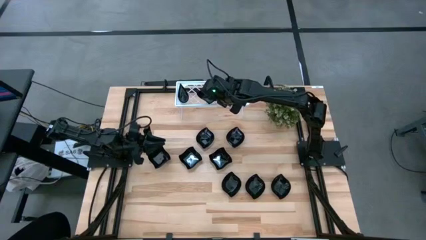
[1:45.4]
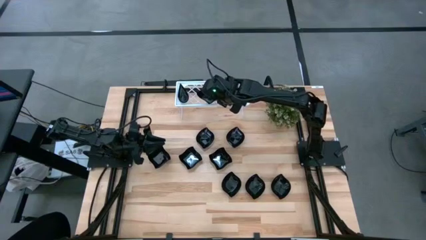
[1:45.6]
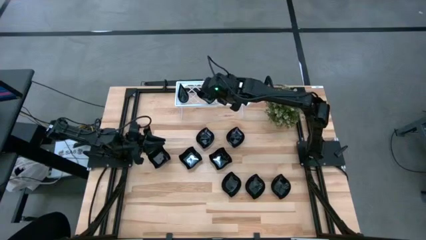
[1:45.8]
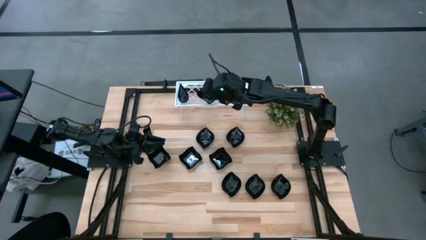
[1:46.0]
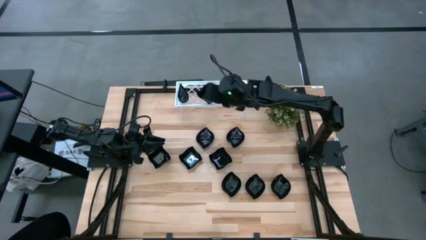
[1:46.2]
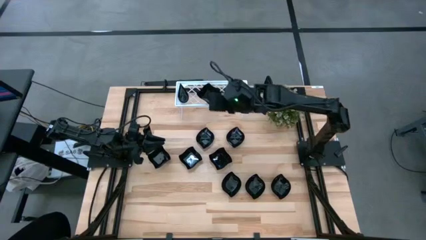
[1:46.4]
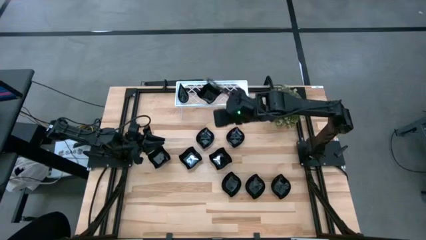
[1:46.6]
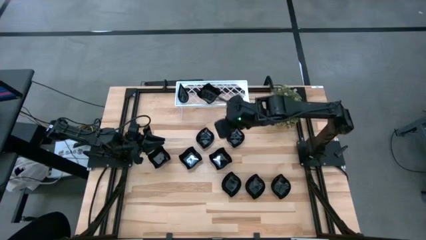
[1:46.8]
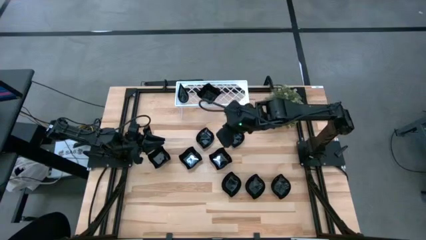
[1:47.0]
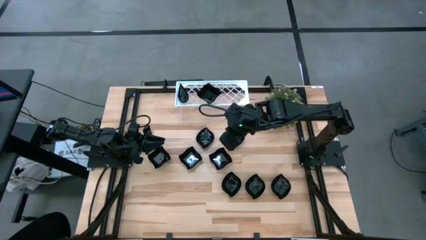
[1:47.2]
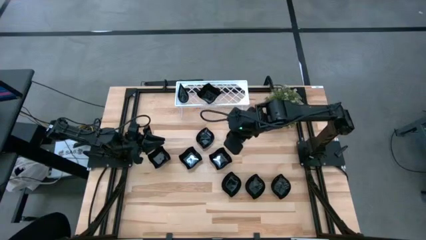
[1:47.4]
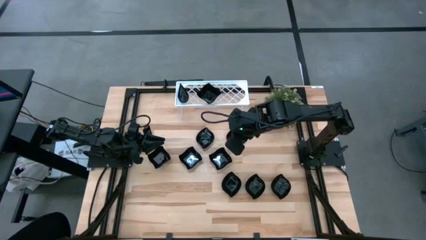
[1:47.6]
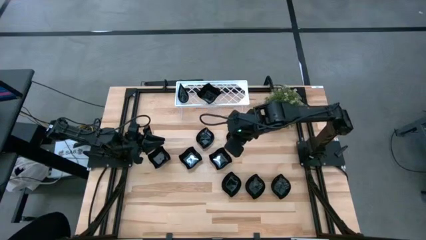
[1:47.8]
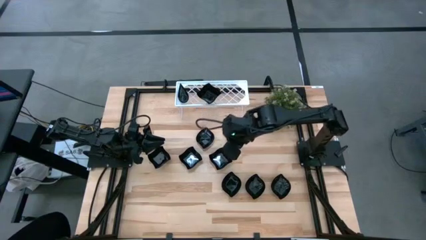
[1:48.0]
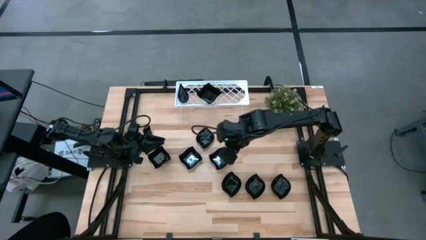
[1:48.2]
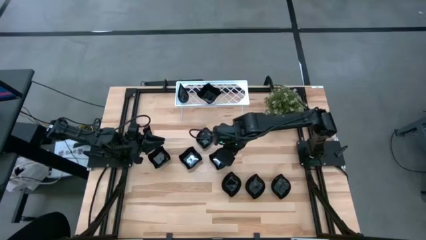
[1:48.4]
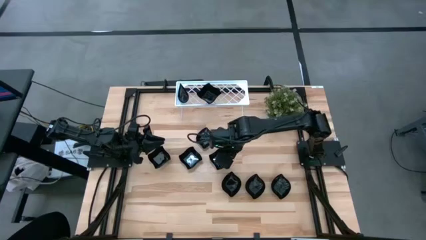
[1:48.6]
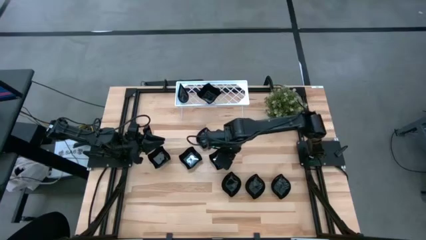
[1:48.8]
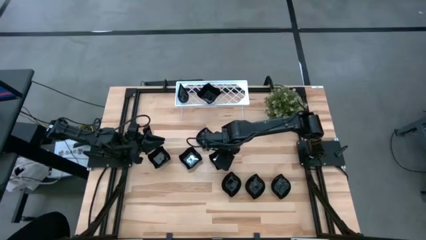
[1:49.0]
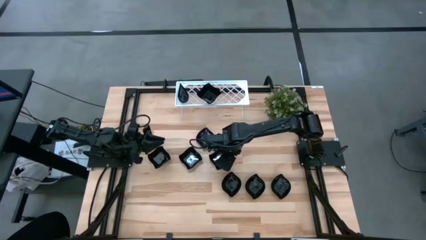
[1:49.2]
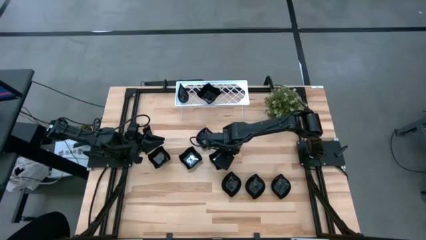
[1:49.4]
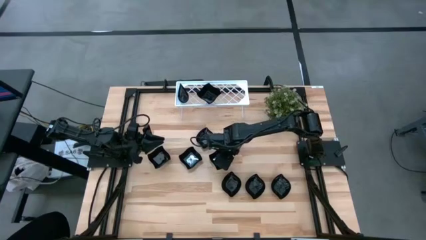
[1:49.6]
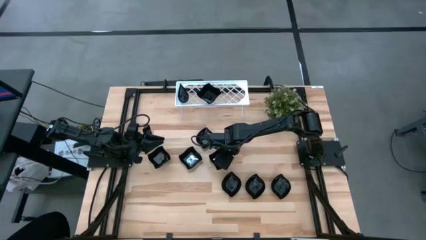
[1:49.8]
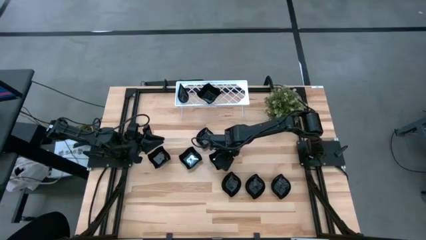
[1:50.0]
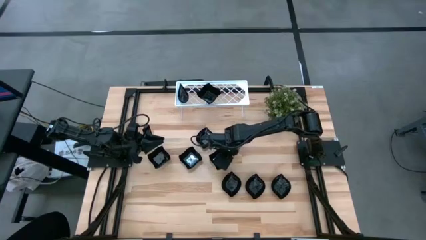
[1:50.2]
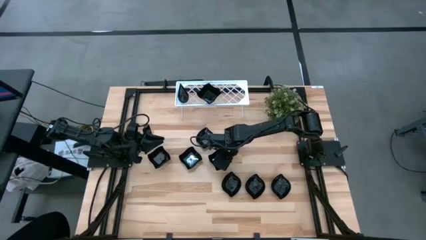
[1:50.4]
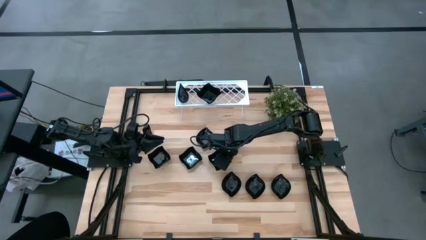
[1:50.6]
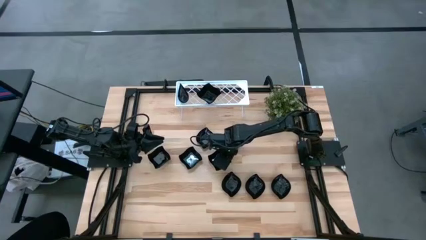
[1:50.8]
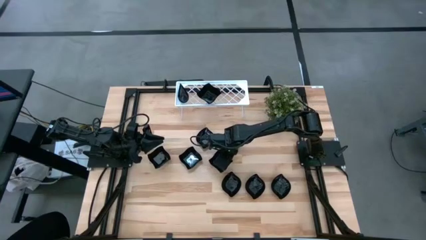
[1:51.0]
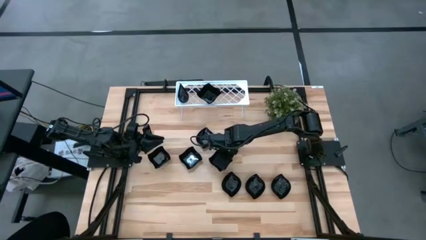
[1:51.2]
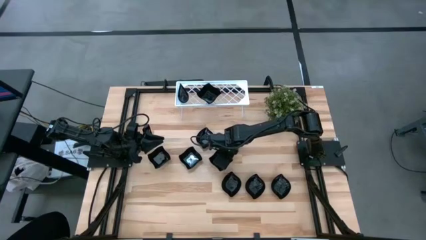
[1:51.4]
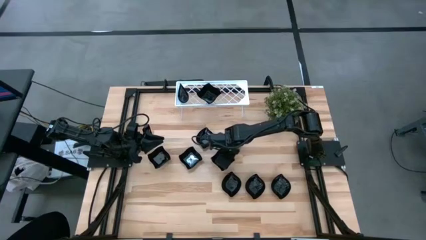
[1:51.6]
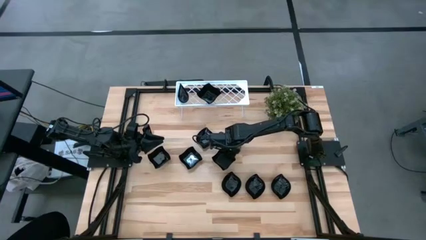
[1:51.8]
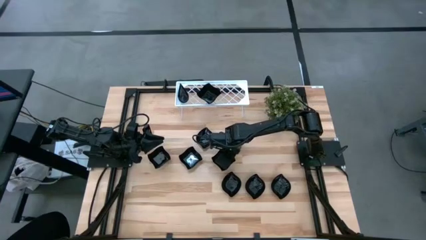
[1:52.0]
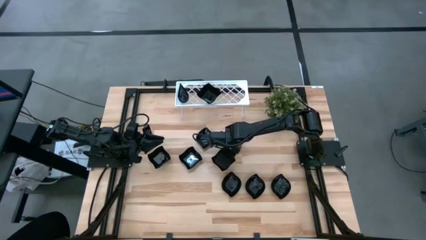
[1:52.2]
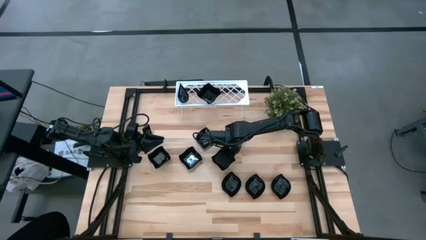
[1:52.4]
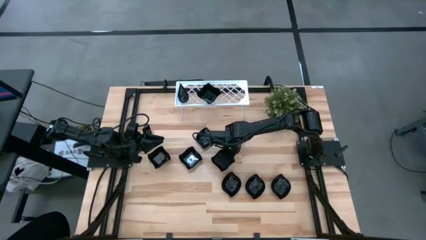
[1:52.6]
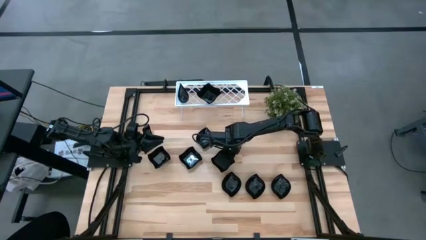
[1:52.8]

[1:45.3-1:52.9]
Task: Pick & Place Mini shaped plates
Stack the distorted square-shaped plate on top of the distorted square-shaped plate on the shelf

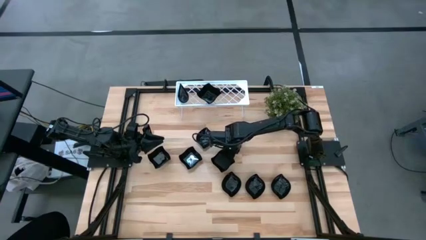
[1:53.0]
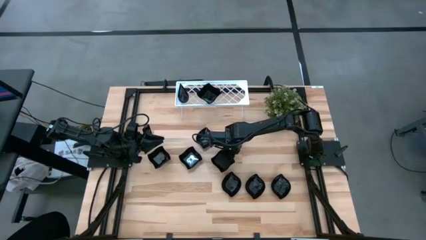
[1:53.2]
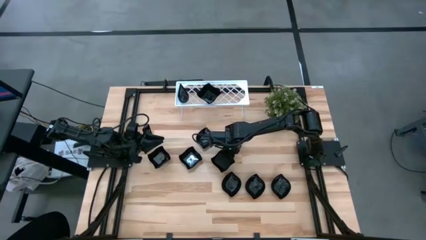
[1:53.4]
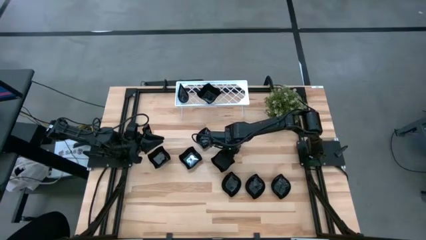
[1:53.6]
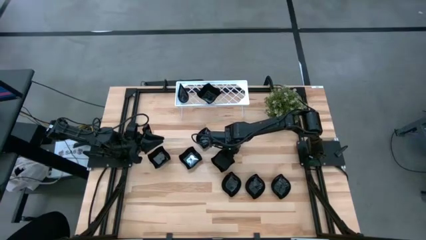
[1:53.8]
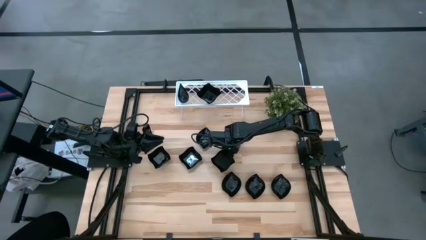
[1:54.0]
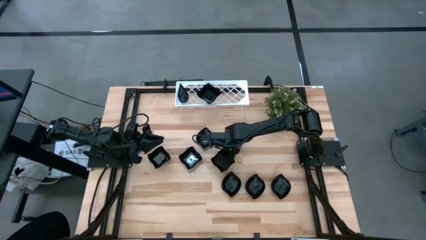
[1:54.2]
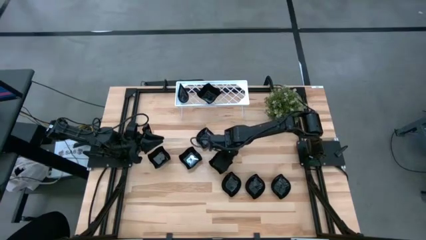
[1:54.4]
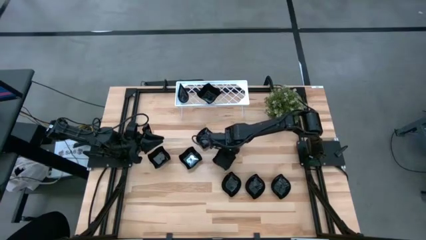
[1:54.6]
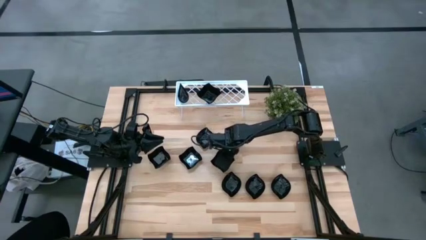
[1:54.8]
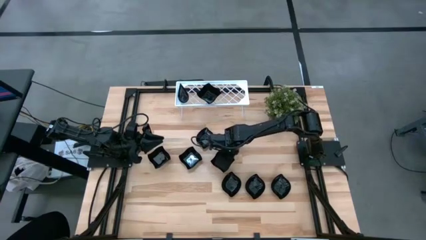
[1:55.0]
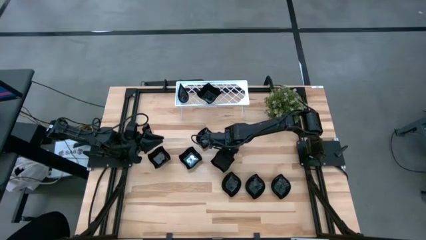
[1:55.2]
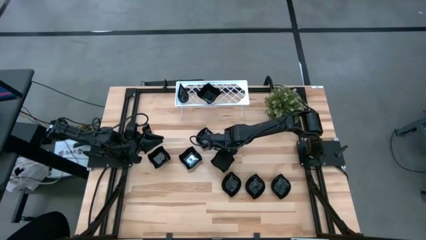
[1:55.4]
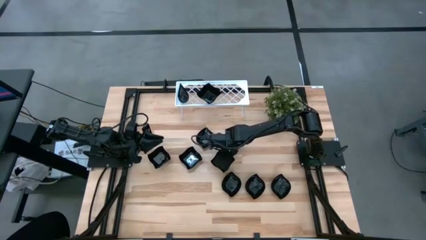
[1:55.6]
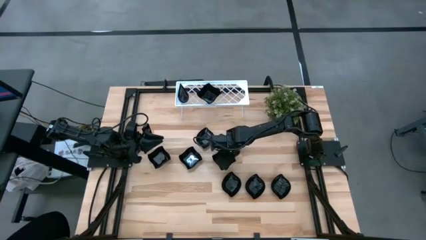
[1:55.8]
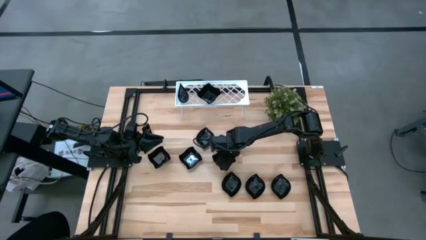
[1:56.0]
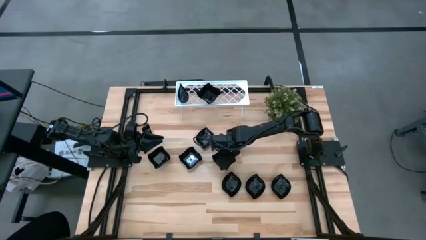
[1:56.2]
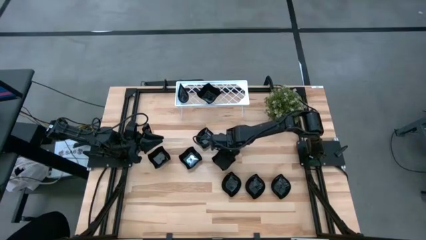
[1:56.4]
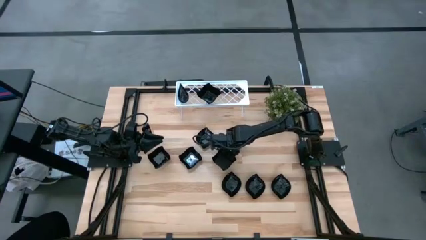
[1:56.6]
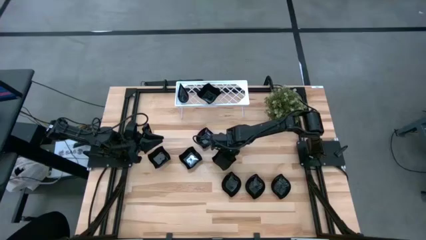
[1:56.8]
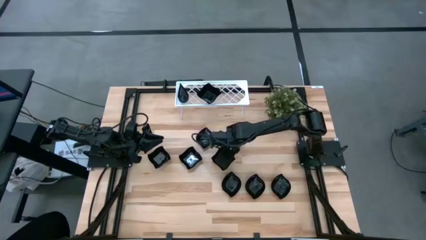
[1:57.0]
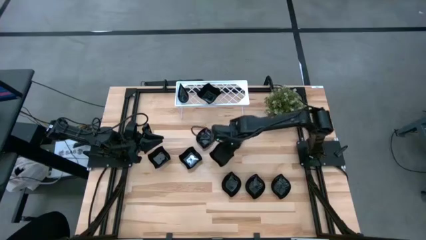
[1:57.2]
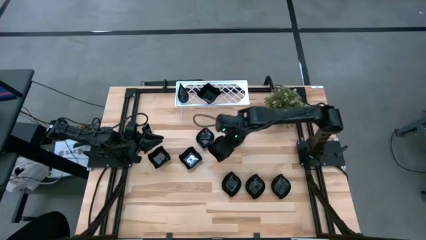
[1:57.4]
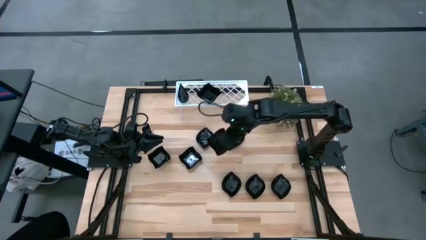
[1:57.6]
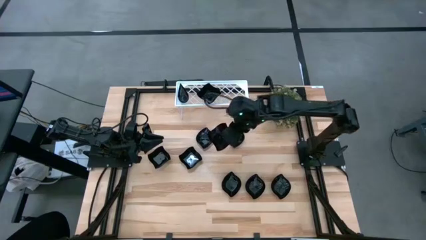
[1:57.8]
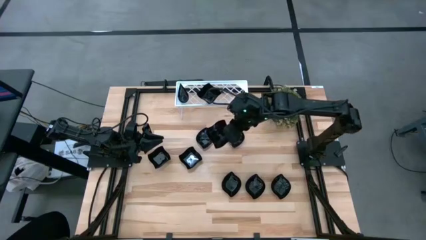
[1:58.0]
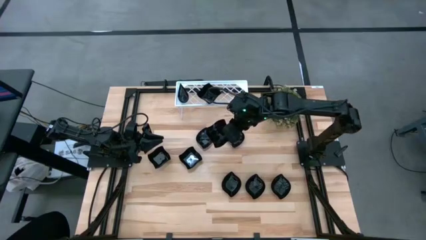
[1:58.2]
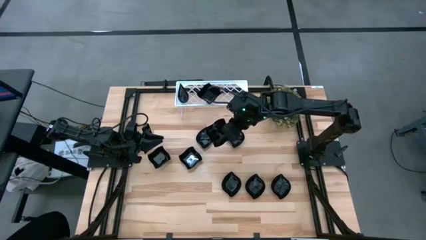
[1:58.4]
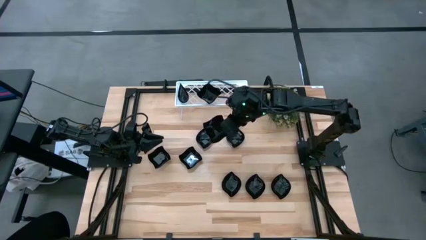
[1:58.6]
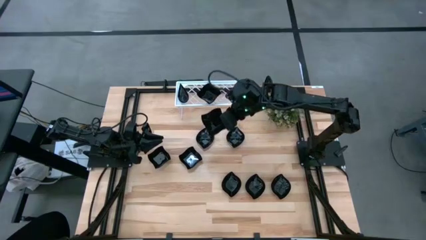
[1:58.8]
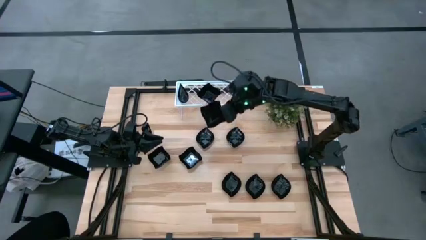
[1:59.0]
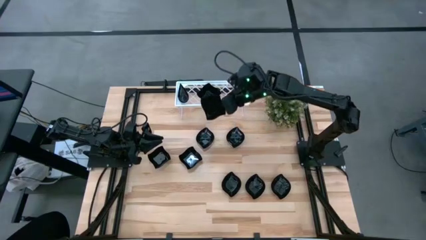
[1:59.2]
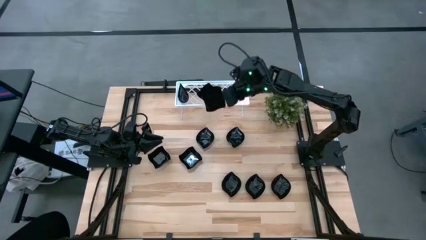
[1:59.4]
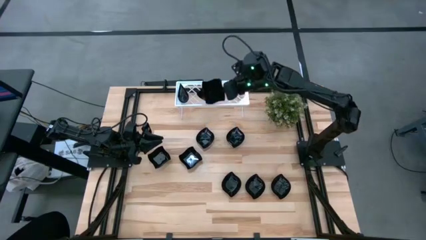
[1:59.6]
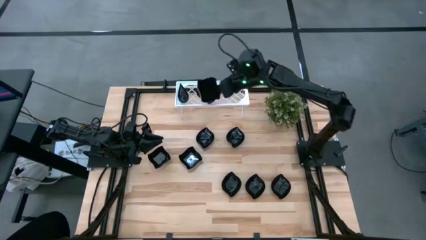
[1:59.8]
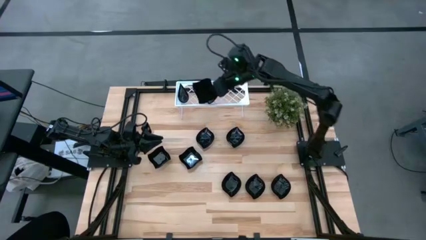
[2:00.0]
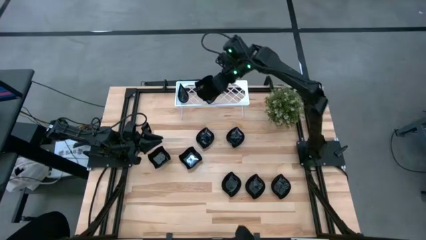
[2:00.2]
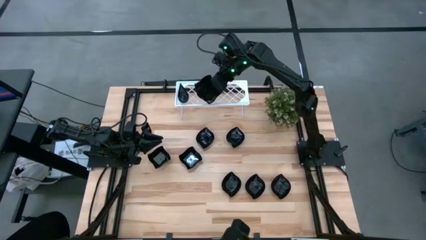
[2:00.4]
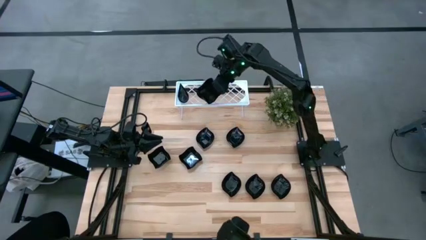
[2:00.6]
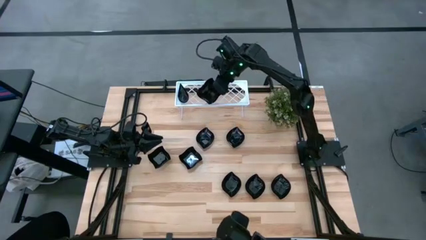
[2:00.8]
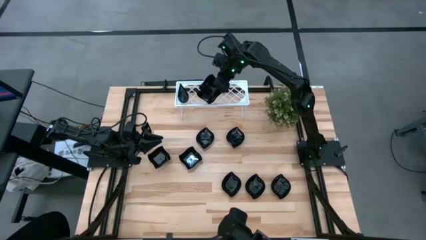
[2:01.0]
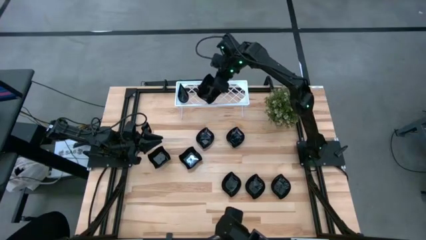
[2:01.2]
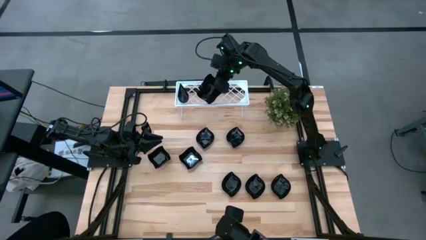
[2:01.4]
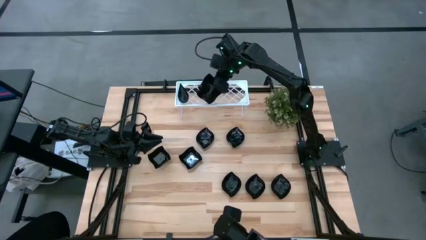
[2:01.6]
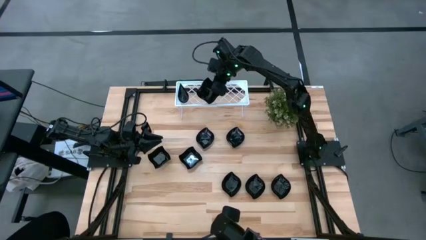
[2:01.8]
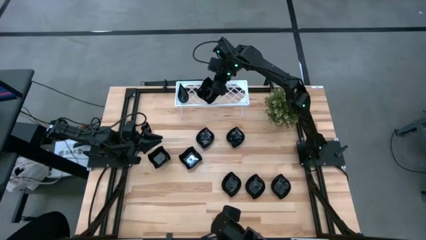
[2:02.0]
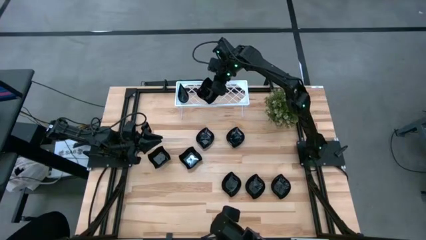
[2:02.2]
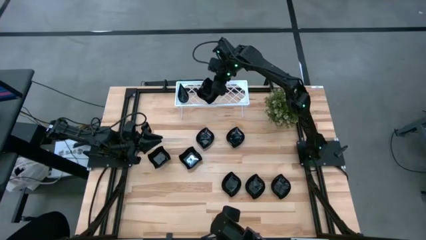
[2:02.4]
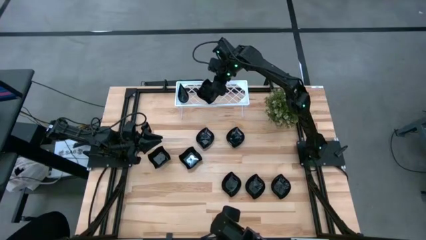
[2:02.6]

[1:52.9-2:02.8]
Stack the distorted square-shaped plate on top of the distorted square-shaped plate on the shelf
